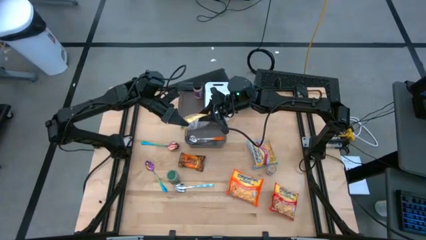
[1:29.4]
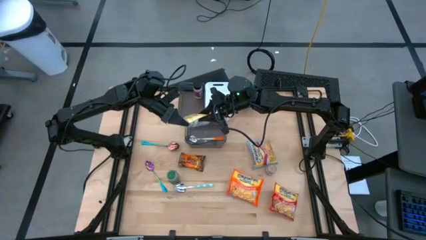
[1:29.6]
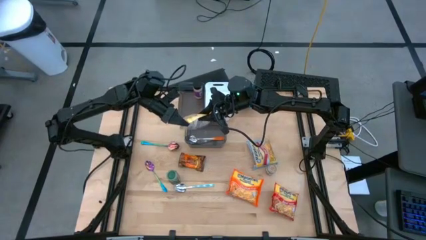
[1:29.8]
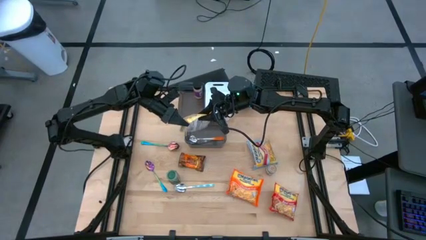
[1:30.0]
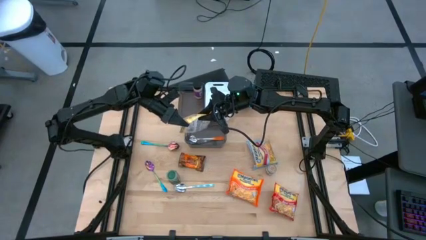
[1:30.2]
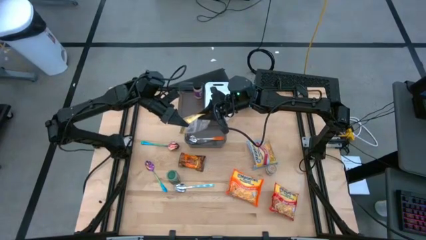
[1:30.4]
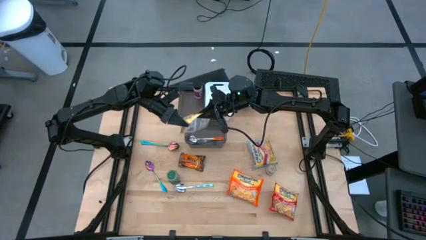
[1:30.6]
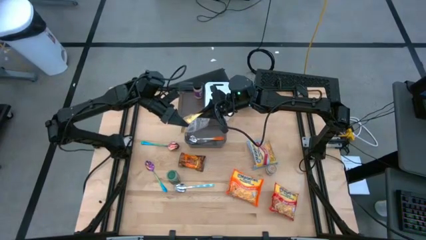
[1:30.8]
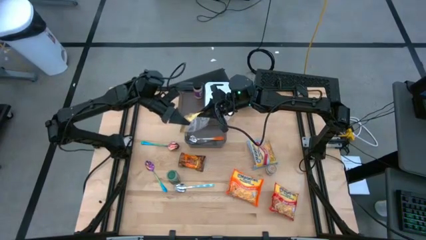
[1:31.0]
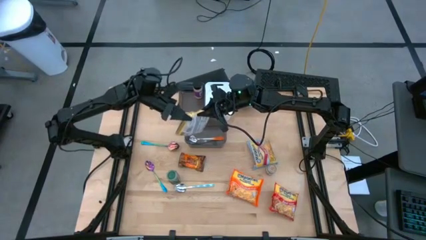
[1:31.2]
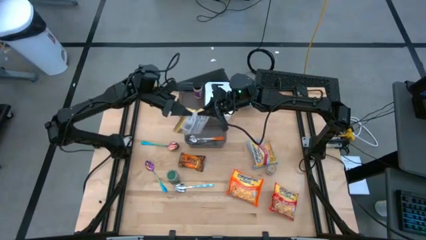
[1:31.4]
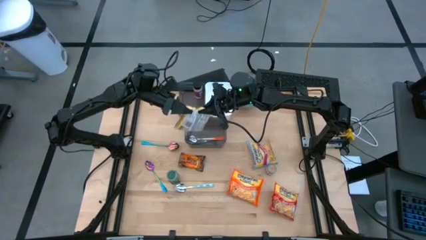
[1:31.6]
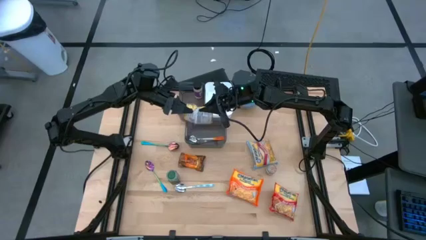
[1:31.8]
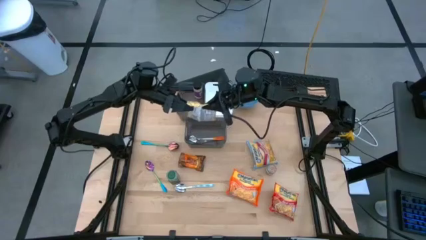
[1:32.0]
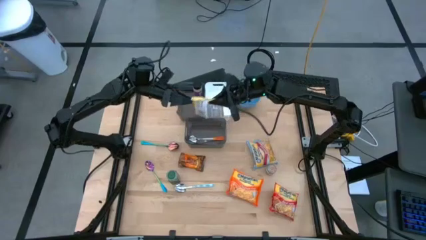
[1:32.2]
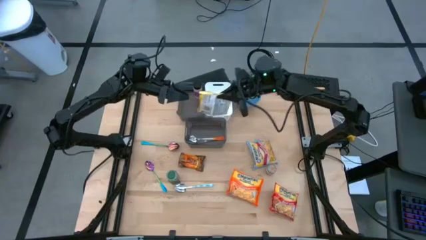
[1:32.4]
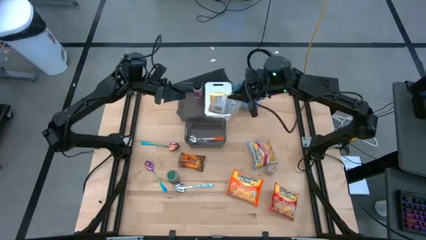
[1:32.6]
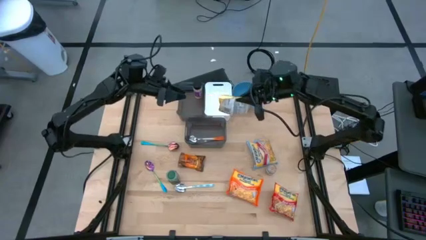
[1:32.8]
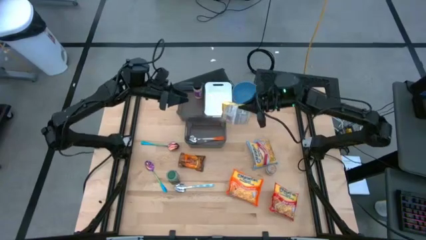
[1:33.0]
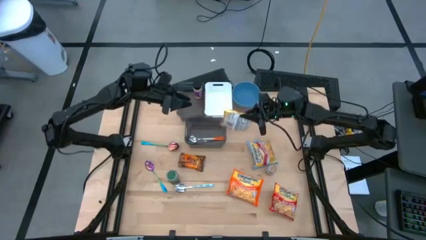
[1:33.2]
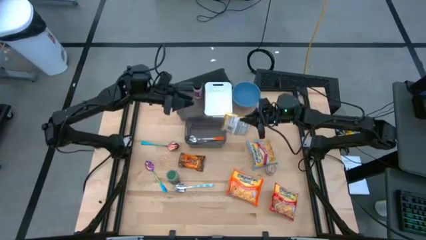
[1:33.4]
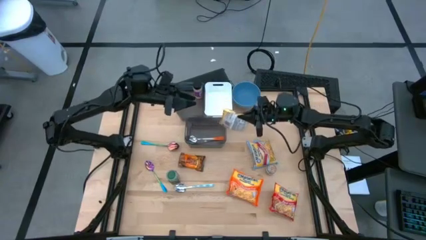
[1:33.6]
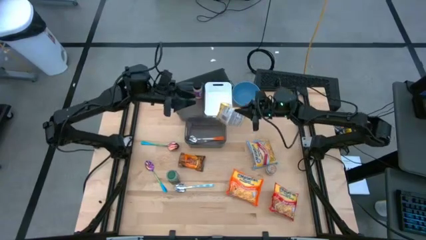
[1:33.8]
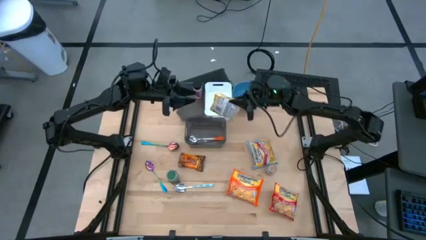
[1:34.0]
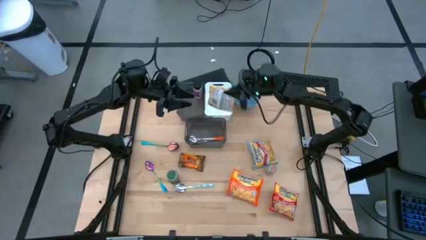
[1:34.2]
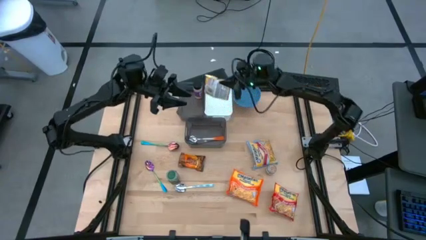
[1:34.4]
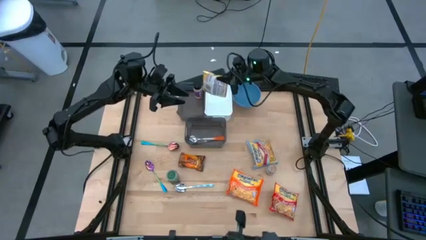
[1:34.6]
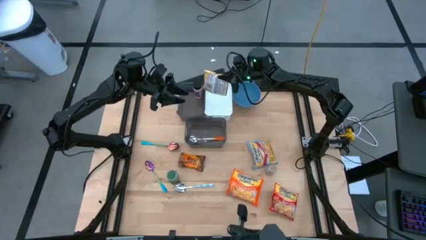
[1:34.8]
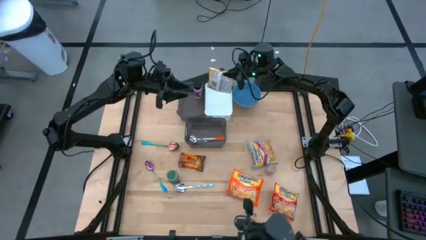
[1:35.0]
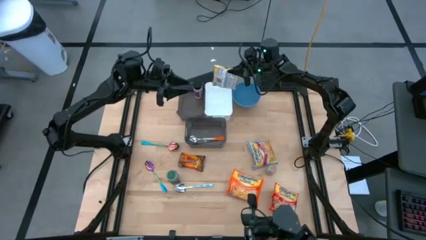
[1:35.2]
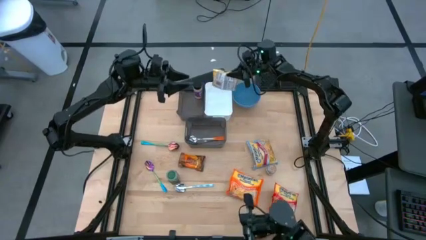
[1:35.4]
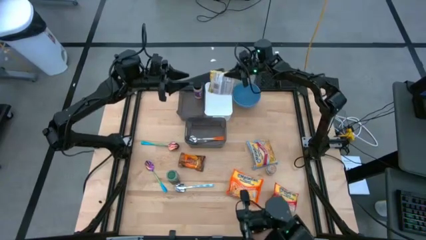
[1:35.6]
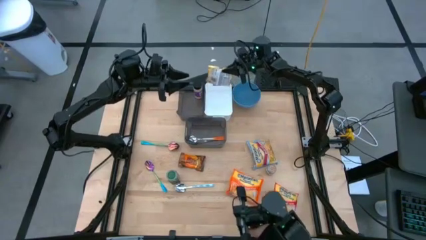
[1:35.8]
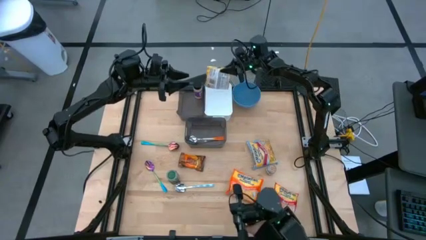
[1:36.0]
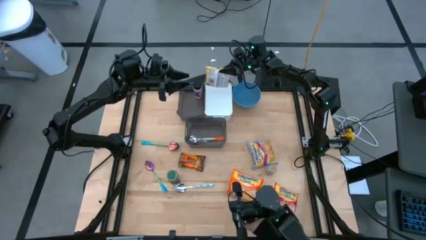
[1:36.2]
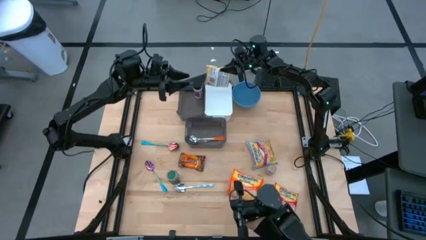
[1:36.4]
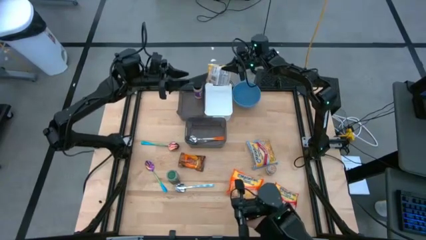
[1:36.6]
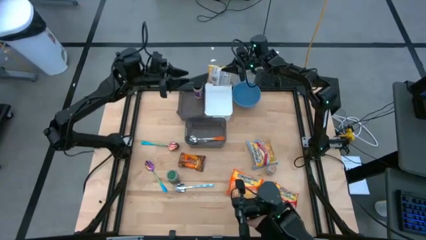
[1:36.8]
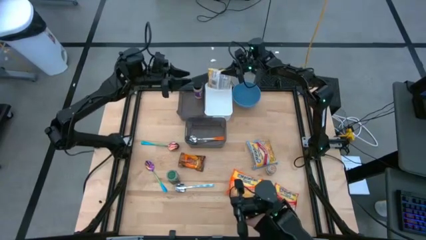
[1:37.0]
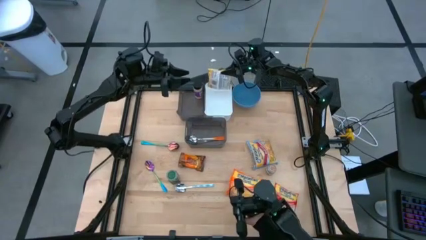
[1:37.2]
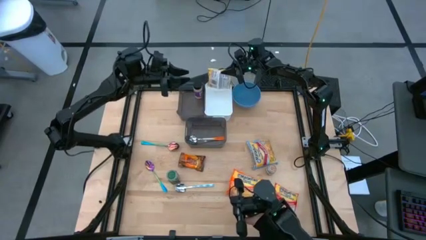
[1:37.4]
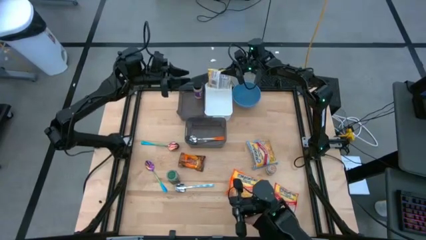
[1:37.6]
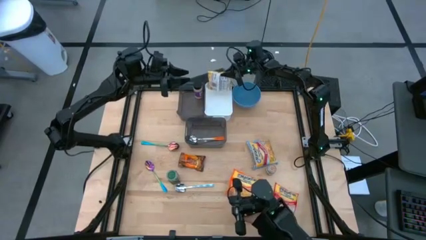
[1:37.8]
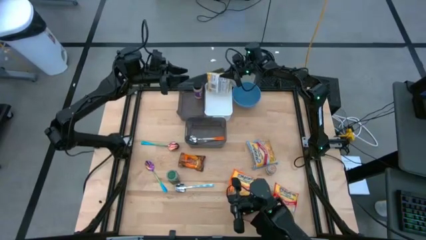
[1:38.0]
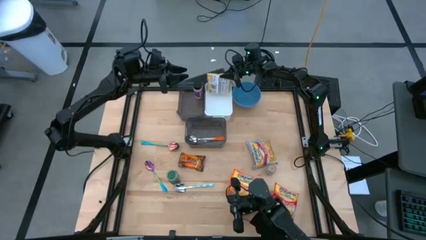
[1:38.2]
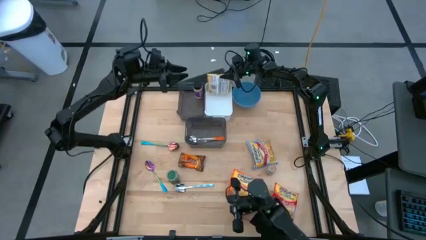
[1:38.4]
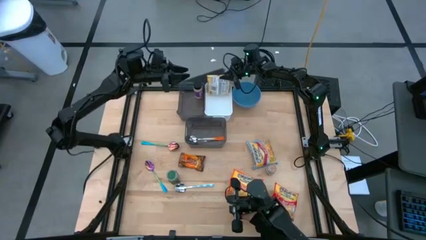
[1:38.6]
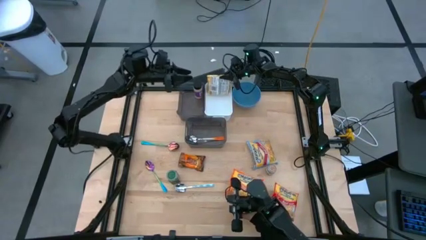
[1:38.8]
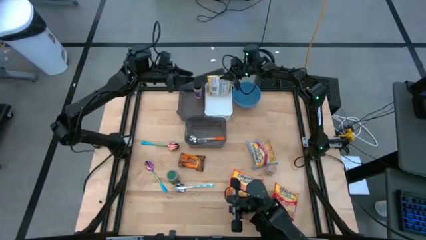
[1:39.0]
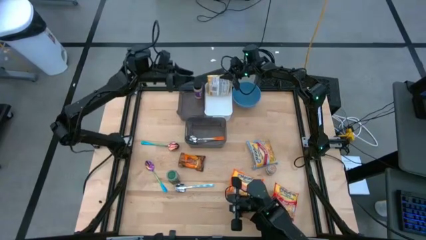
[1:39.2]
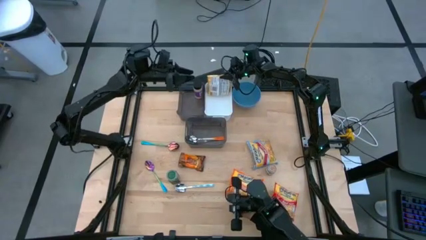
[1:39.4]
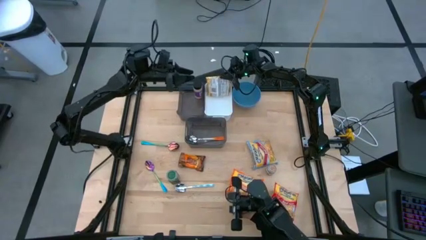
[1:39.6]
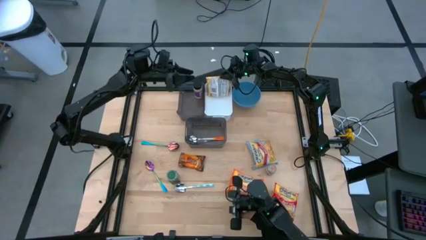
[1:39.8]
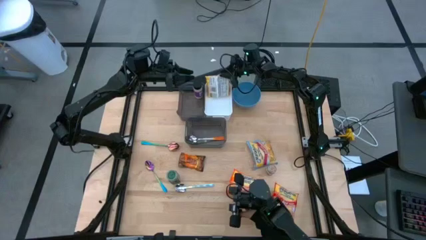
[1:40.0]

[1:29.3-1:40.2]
Task: Pick & Place Food Item
Put the yellow noodle pack into the white bin

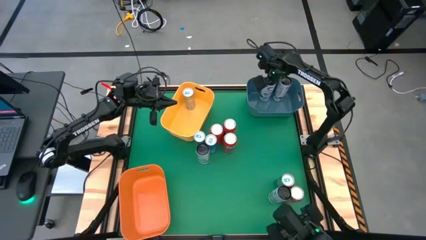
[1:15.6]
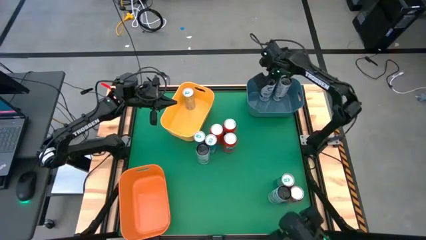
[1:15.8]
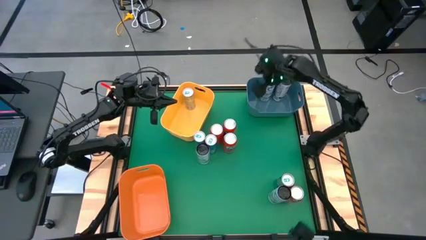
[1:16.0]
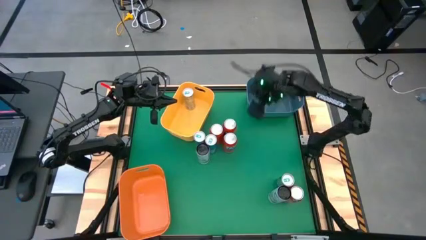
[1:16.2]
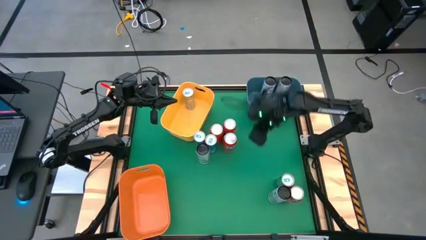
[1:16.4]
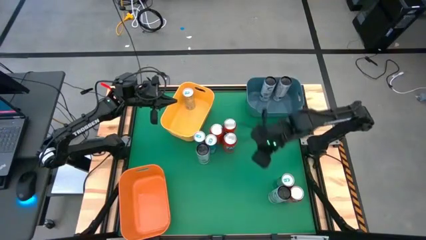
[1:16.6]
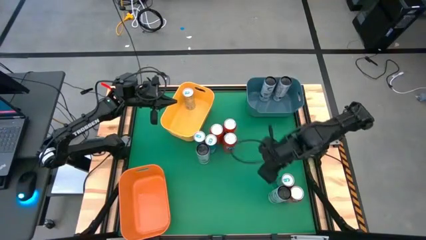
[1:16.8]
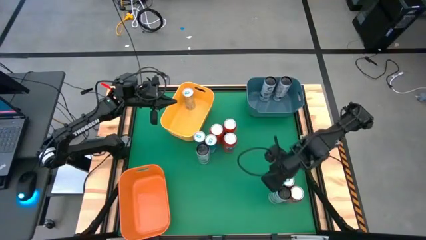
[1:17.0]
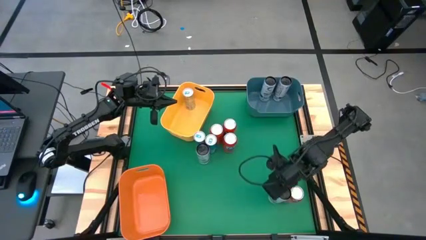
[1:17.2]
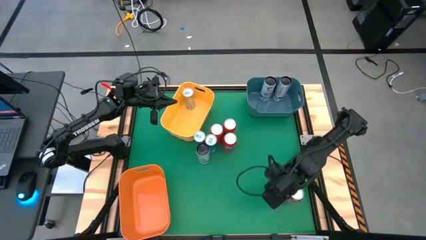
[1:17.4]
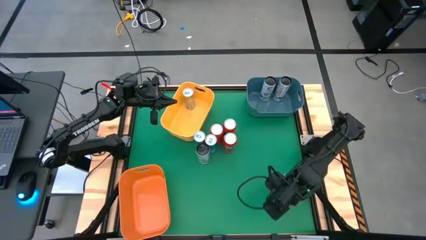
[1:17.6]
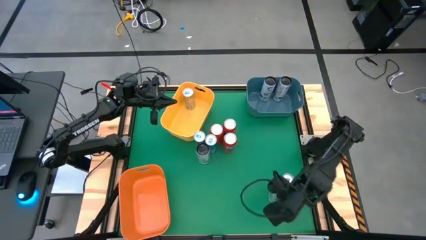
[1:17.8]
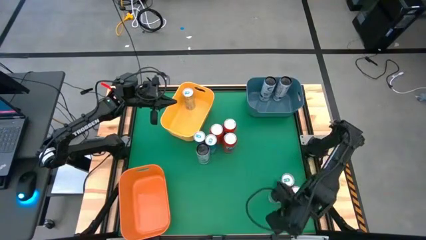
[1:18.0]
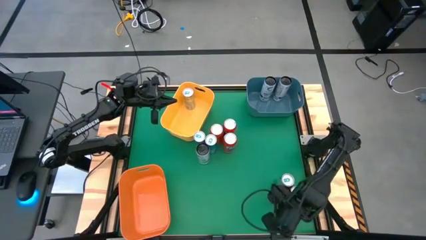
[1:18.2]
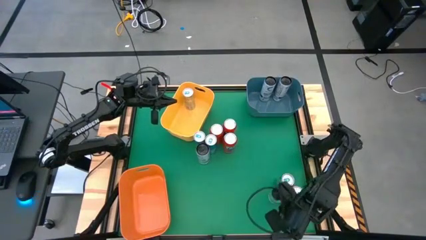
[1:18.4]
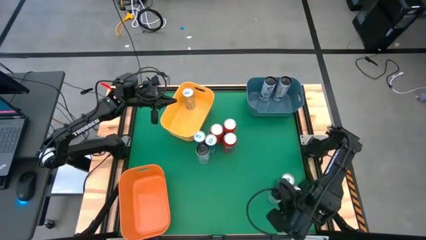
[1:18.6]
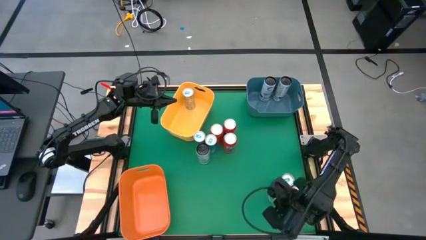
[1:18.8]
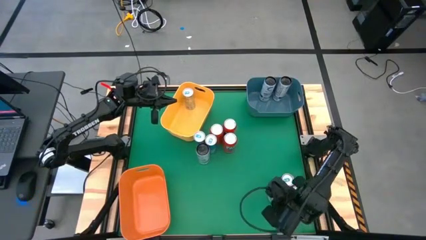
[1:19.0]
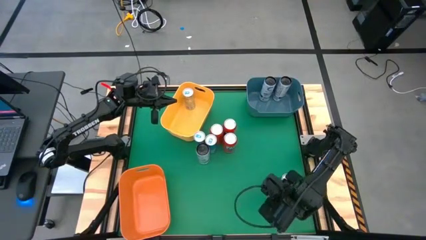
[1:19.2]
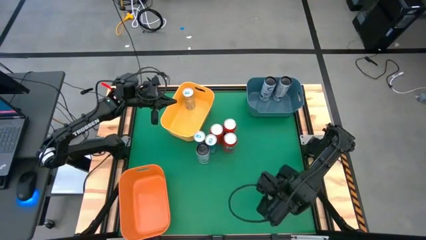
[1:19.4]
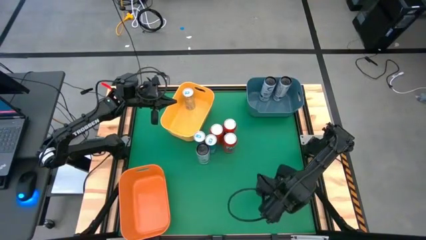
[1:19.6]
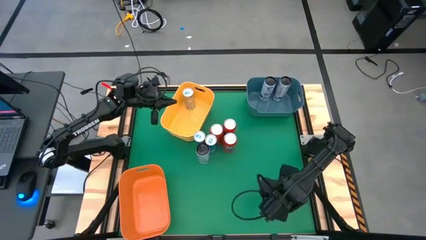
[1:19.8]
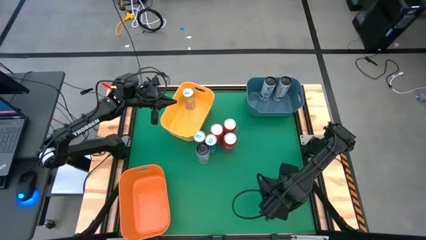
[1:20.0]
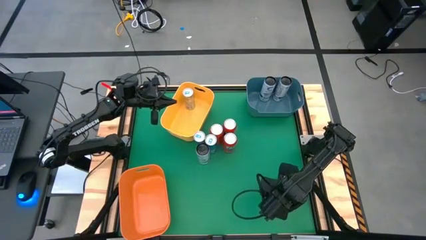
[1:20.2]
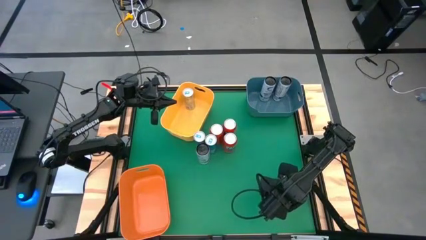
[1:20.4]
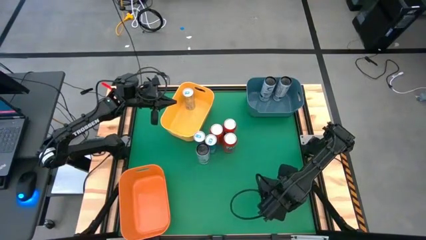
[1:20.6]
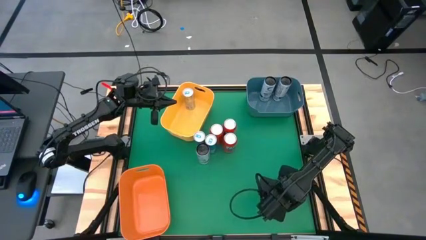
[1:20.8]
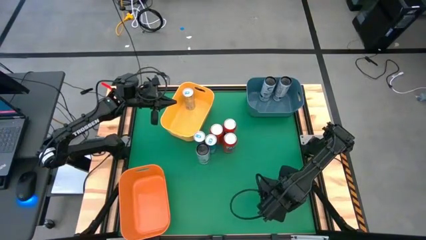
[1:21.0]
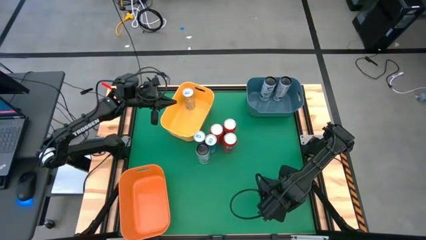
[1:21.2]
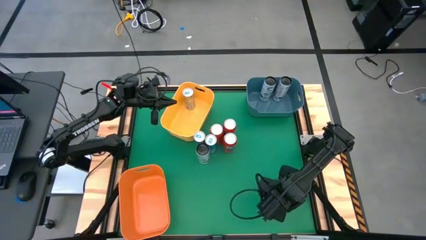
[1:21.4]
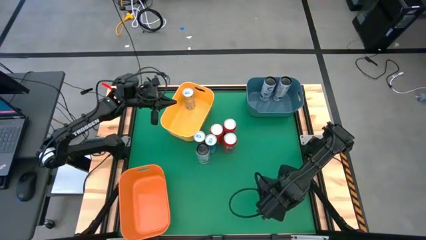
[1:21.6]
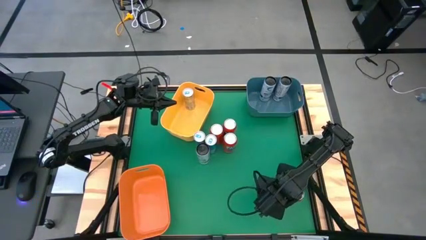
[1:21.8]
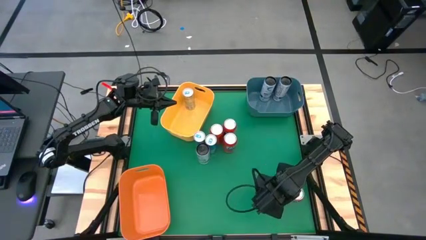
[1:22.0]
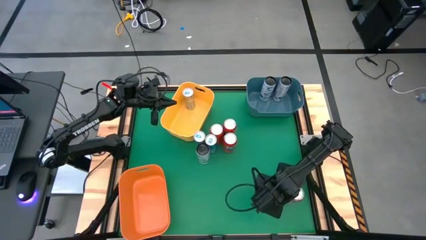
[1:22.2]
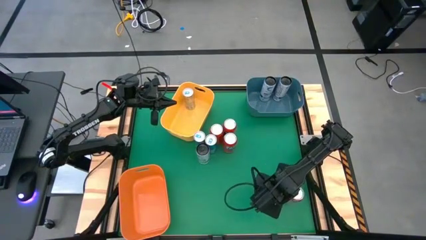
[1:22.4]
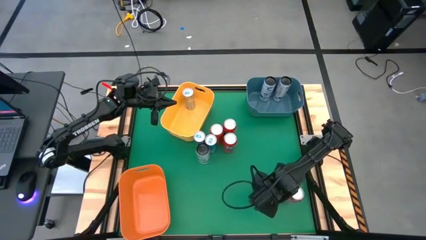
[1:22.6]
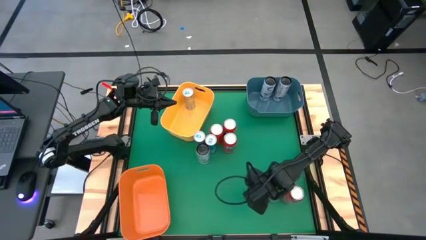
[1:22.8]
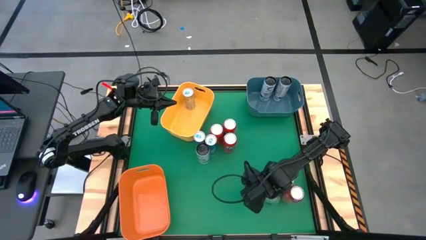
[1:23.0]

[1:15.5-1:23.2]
Task: Sort soda cans
Put the white blue soda can into the blue bin
